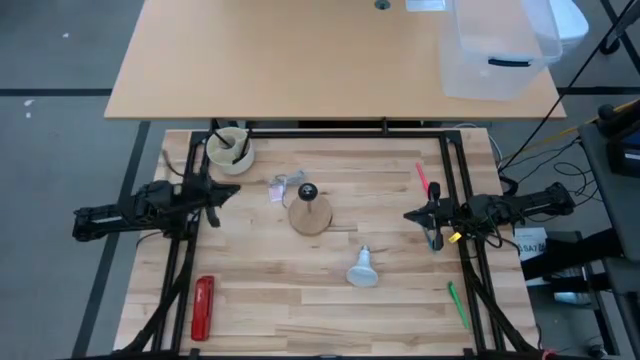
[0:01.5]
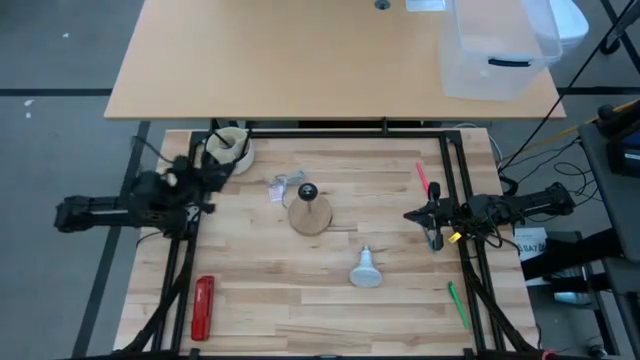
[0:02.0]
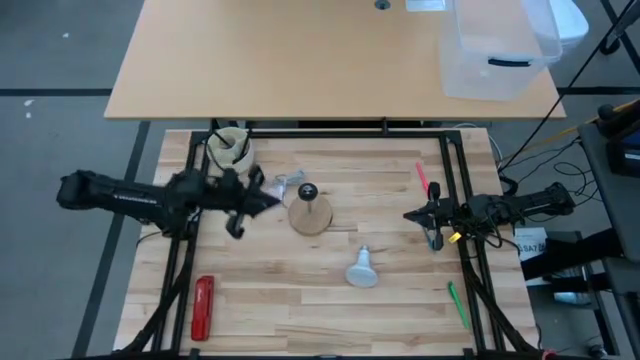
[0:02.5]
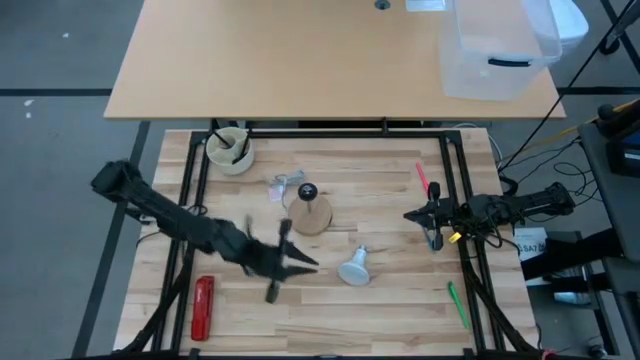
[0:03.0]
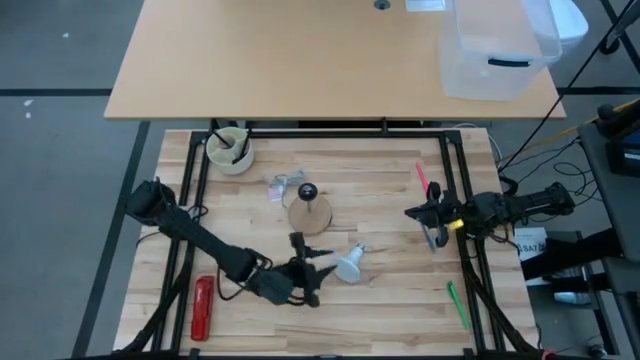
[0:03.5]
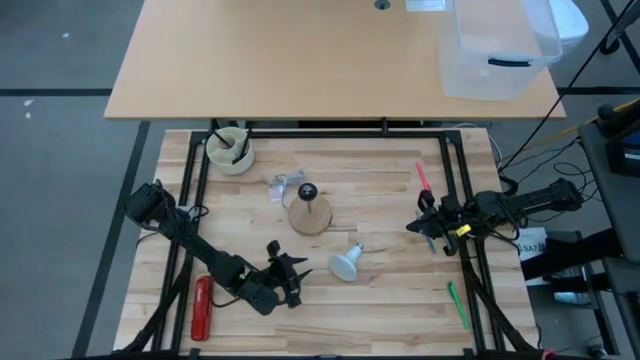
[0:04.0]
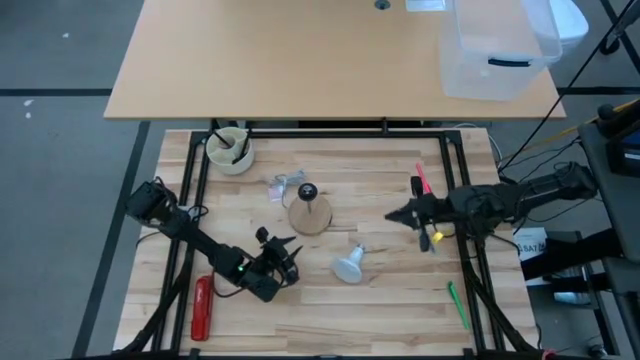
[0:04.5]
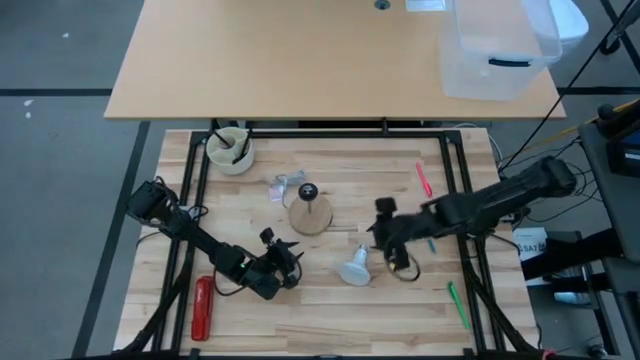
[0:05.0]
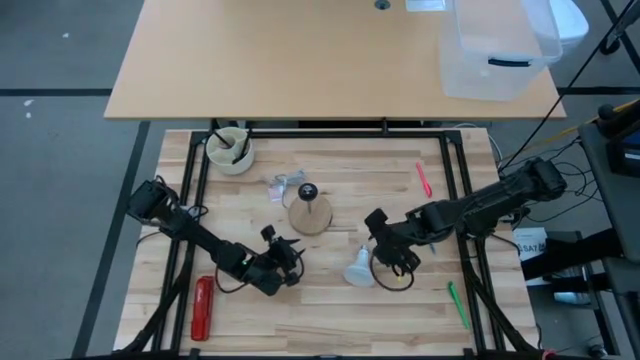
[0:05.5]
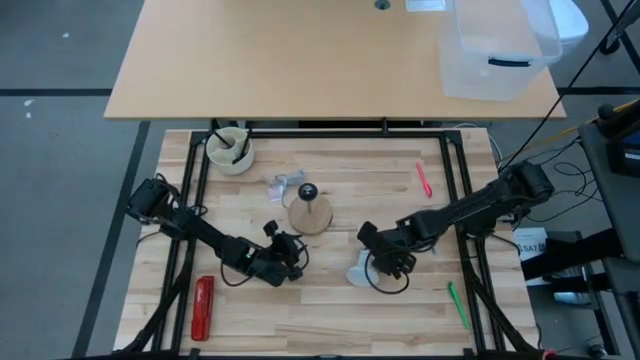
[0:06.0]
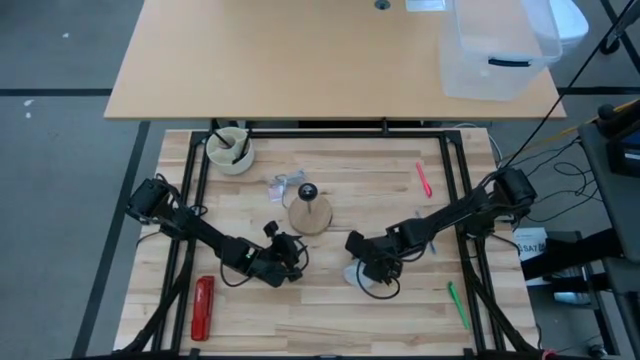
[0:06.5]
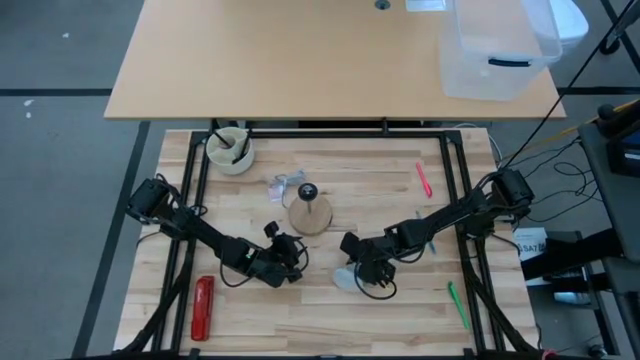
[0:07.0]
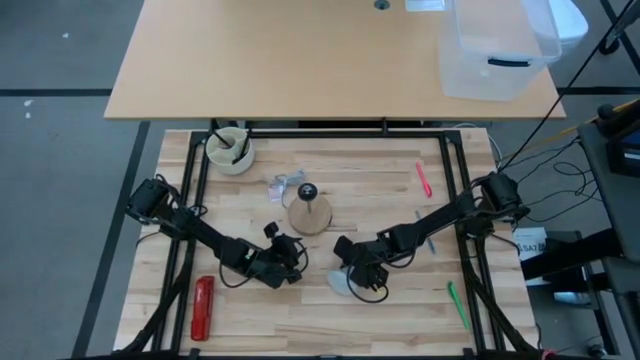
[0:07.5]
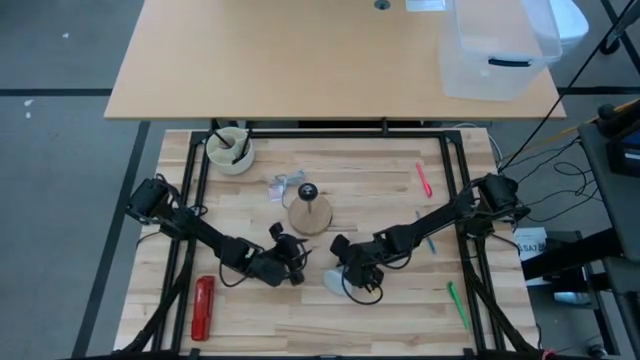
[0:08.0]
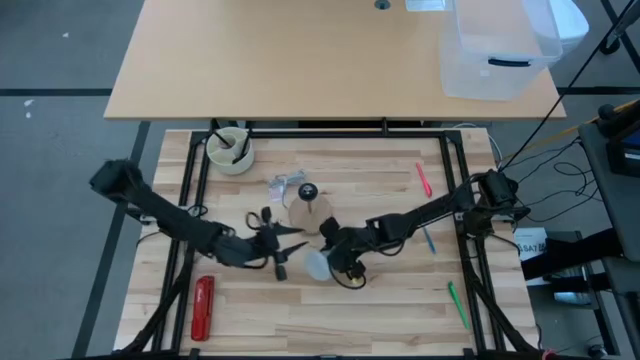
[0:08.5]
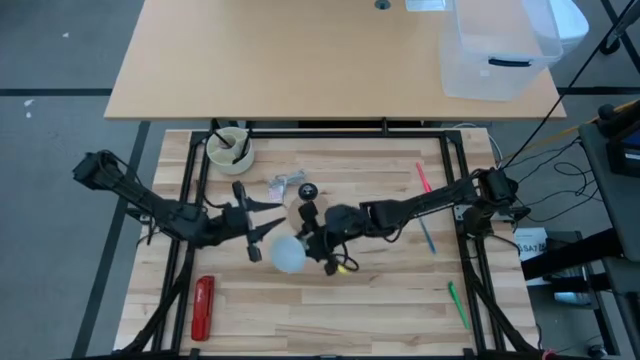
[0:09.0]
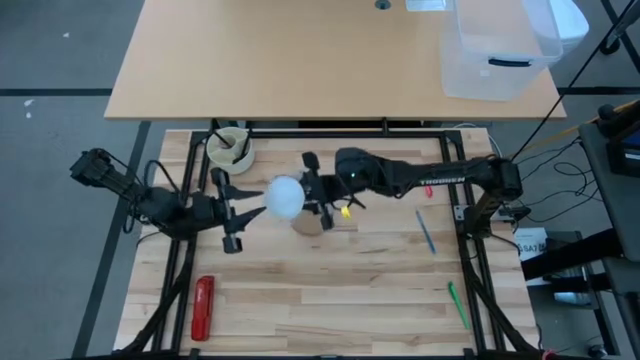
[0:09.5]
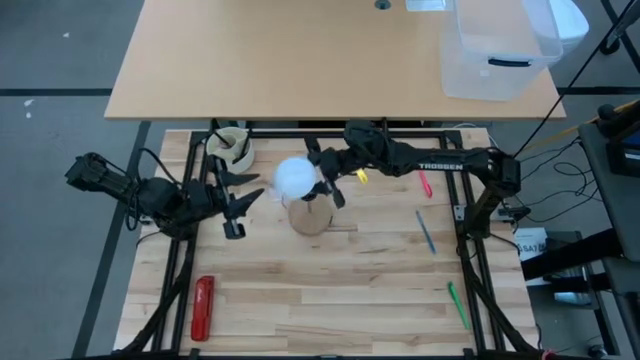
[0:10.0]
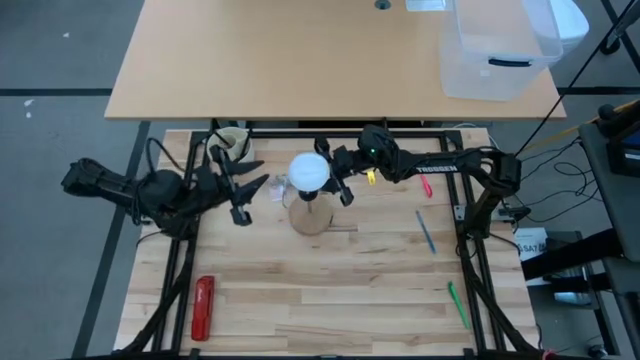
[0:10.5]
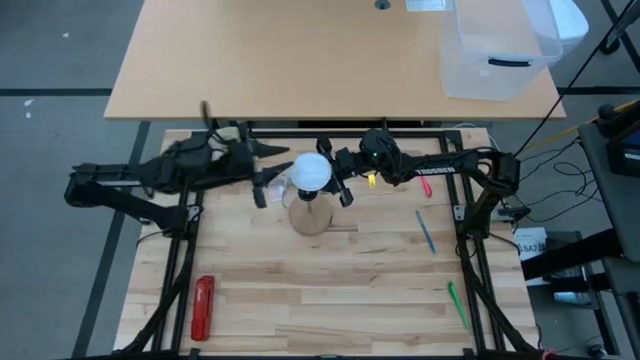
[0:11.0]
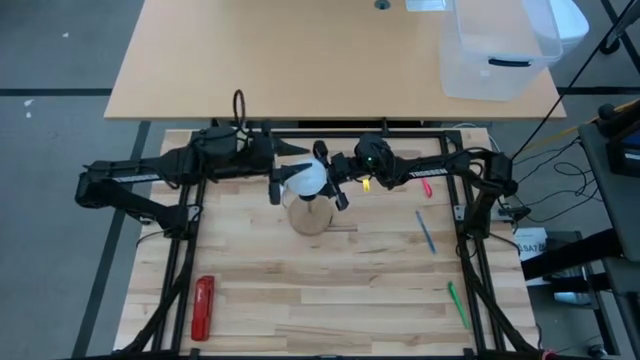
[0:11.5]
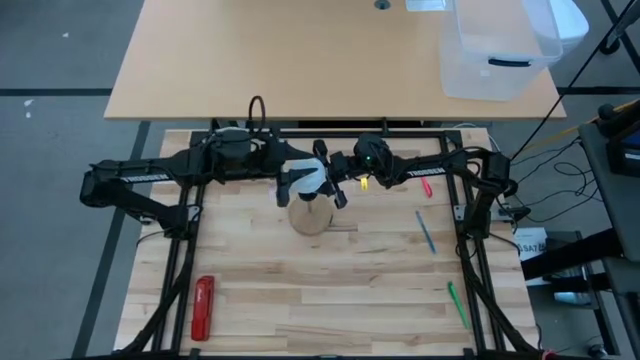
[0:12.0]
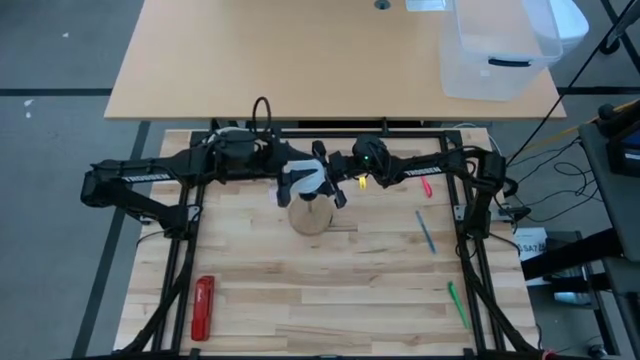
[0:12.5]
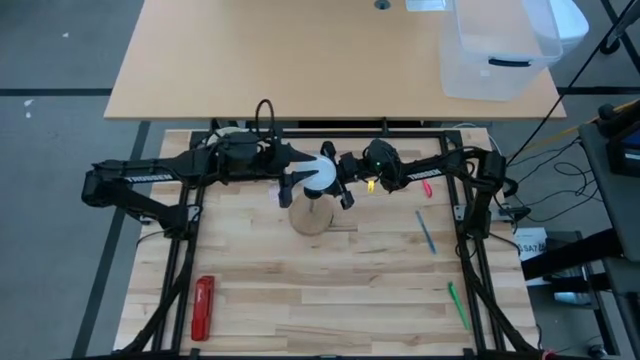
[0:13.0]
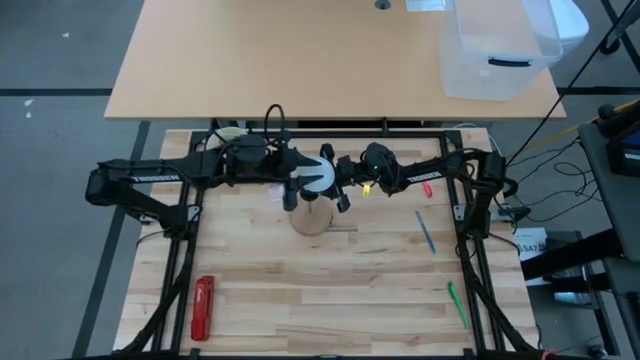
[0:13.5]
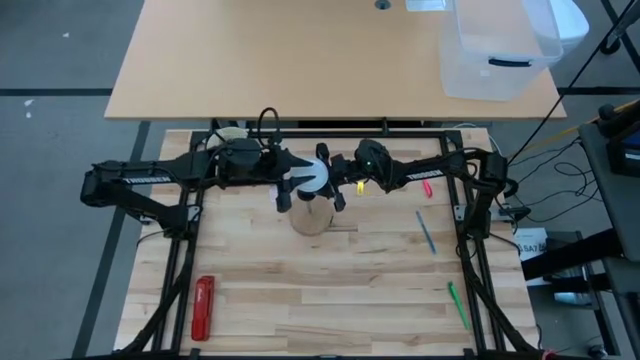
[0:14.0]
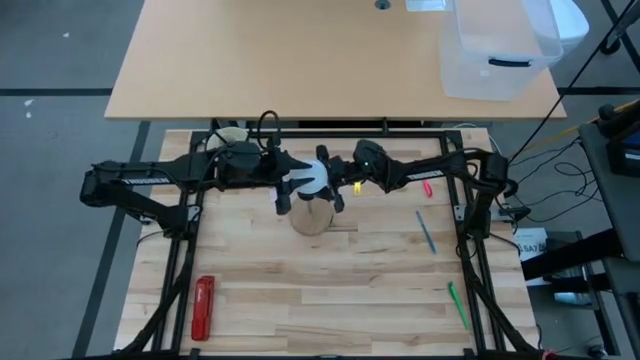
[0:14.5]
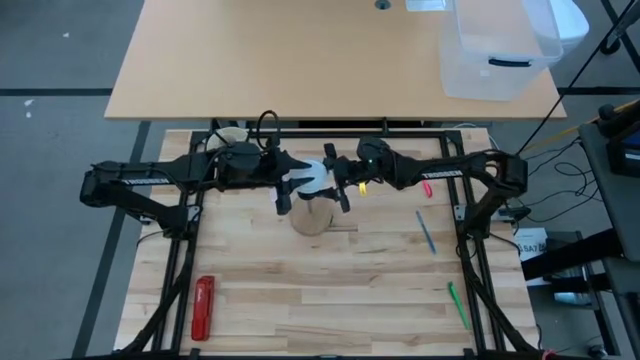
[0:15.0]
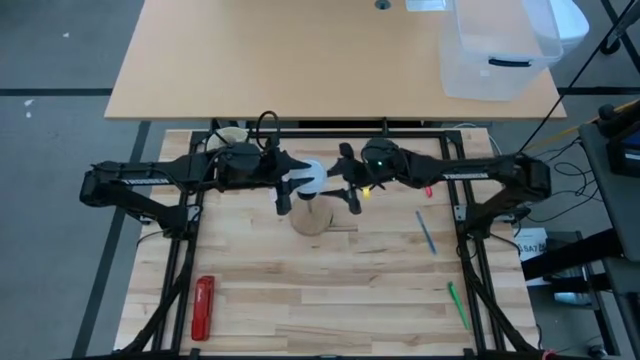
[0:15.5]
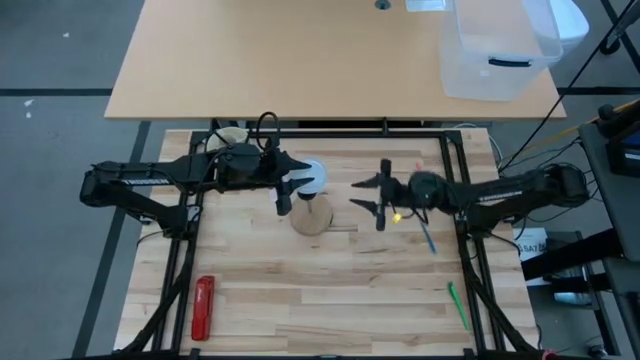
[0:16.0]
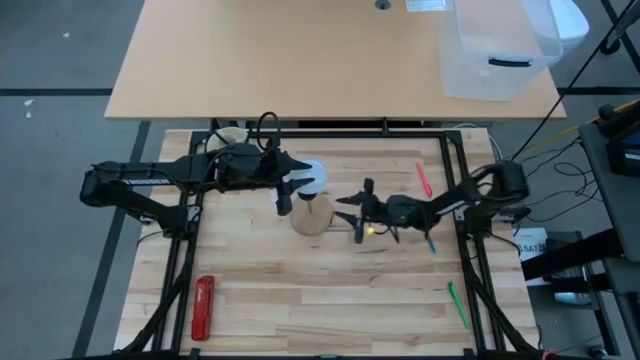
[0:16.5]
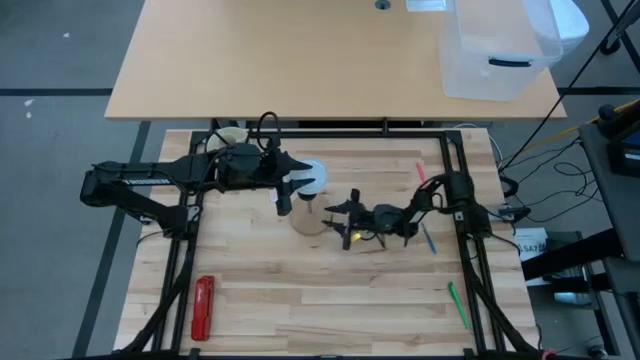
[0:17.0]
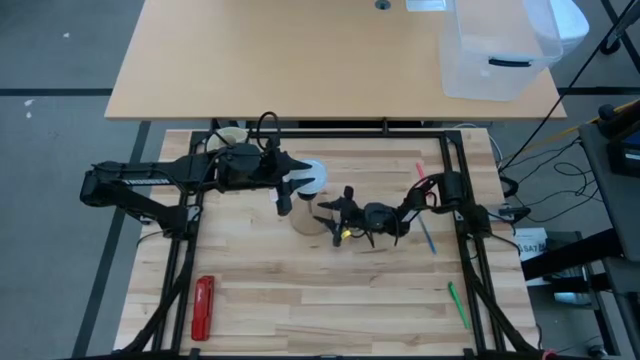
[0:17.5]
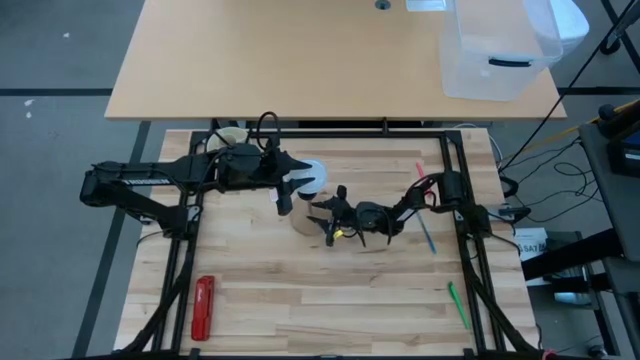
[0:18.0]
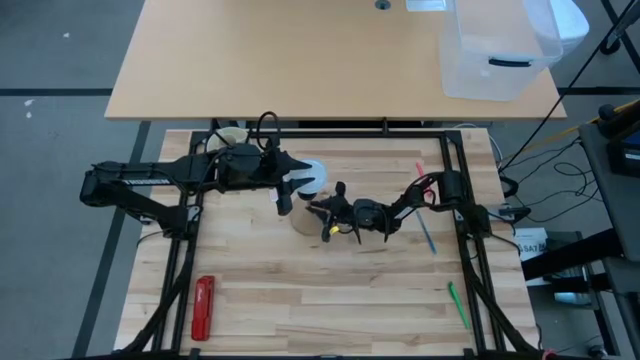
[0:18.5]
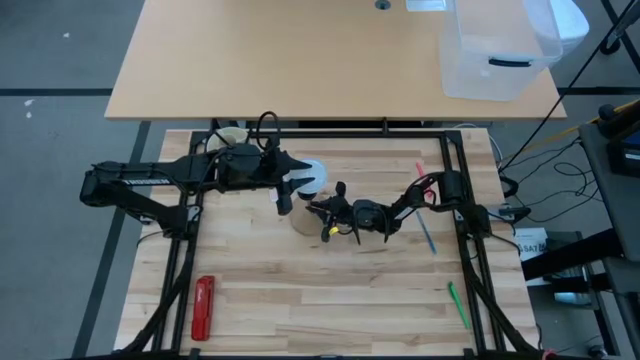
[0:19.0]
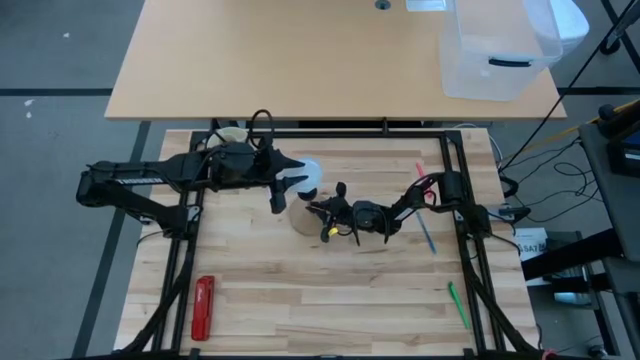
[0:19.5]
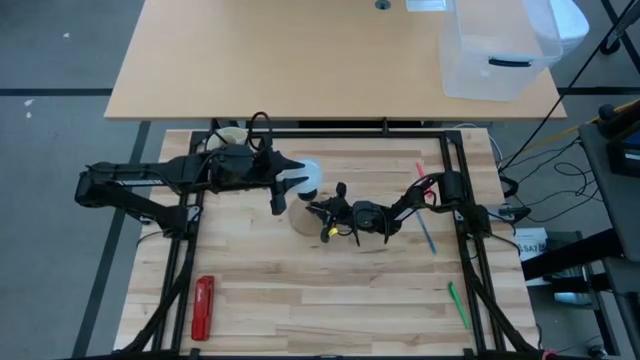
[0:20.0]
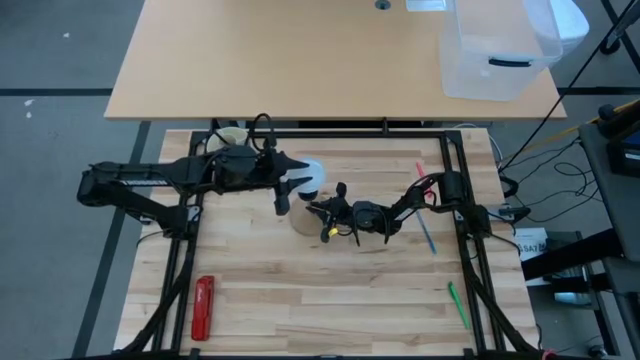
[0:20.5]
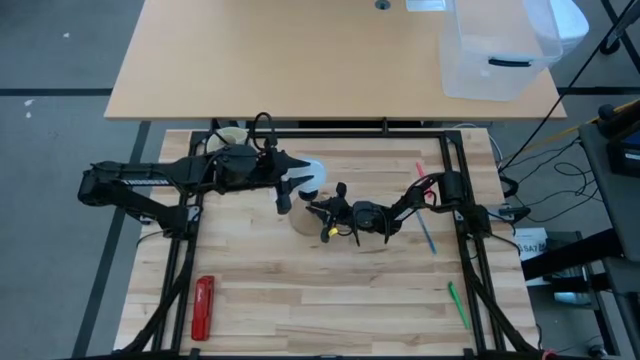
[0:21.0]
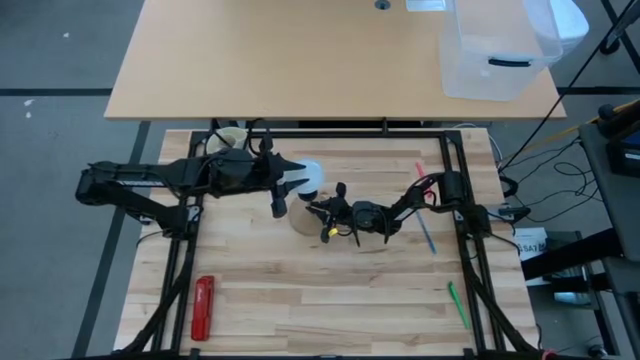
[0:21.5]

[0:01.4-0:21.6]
Task: Screw lightbulb
Insert the lightbulb into the desk lamp
